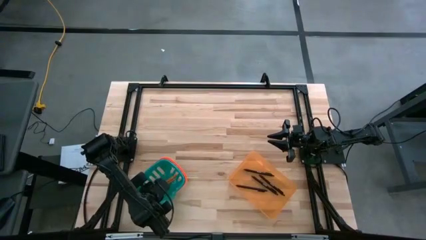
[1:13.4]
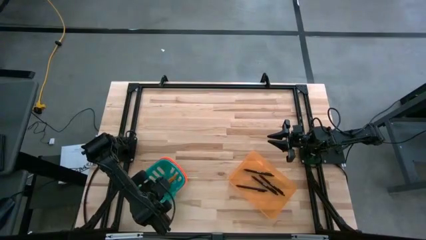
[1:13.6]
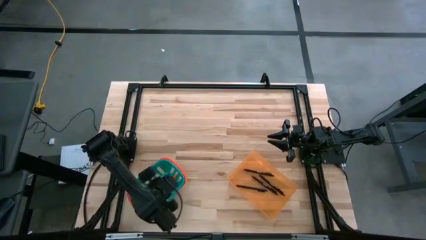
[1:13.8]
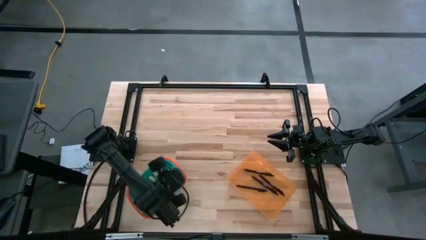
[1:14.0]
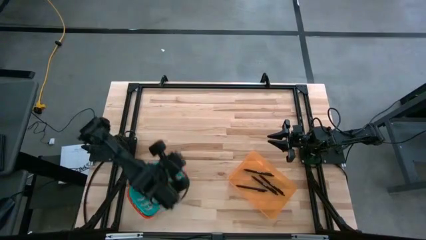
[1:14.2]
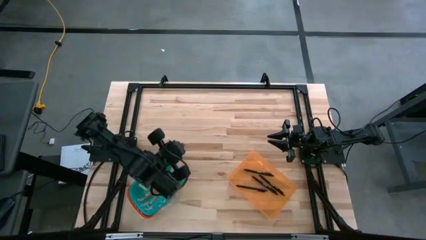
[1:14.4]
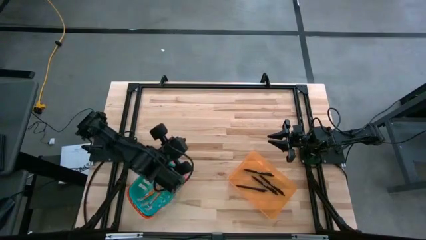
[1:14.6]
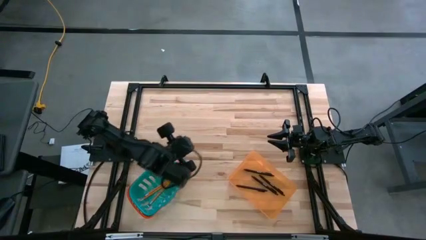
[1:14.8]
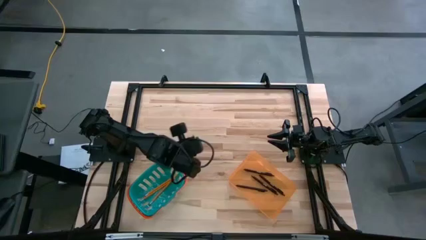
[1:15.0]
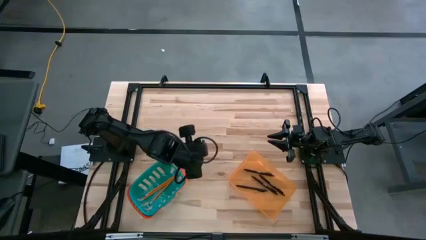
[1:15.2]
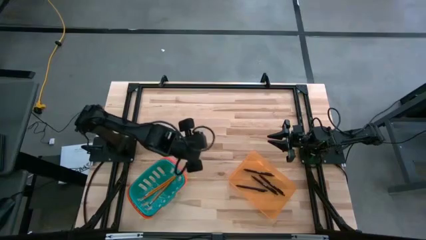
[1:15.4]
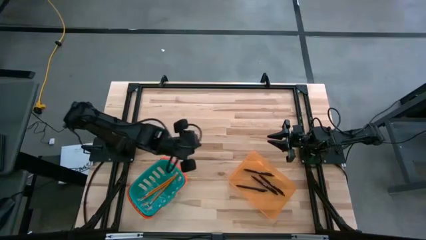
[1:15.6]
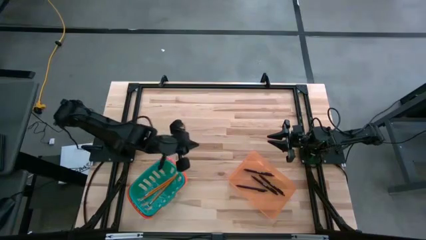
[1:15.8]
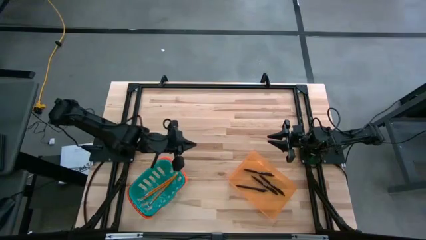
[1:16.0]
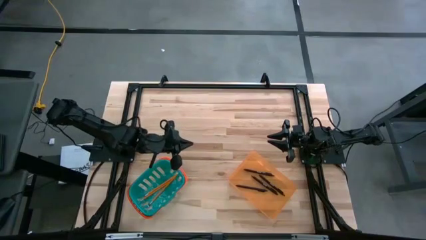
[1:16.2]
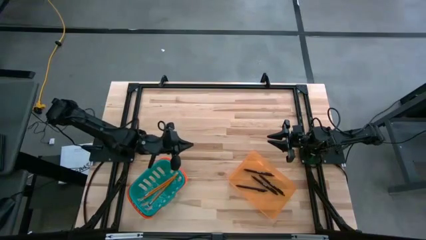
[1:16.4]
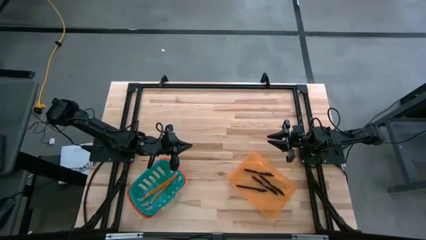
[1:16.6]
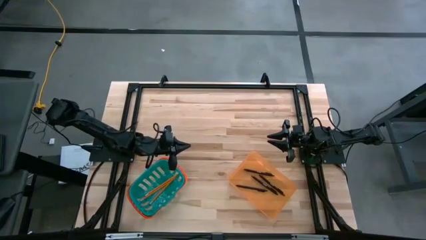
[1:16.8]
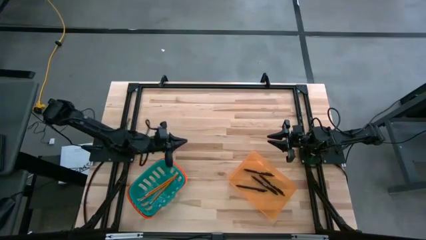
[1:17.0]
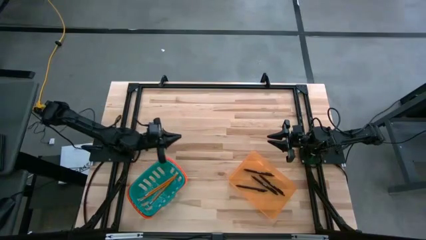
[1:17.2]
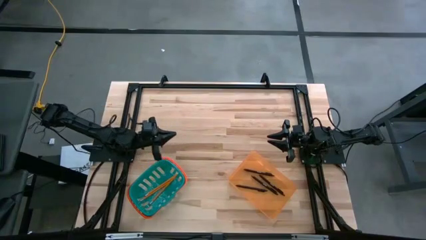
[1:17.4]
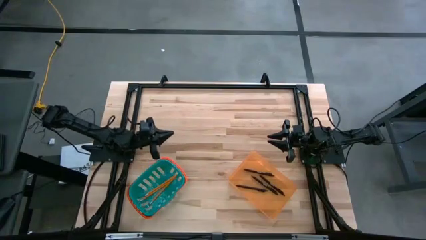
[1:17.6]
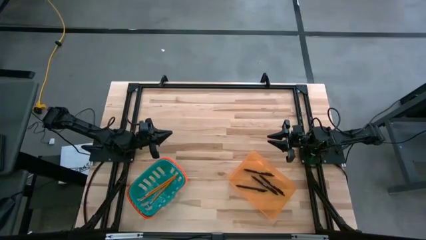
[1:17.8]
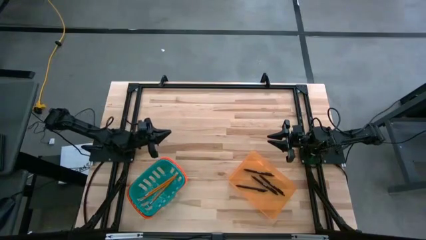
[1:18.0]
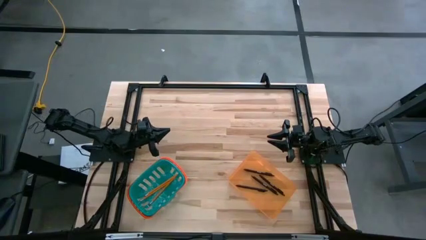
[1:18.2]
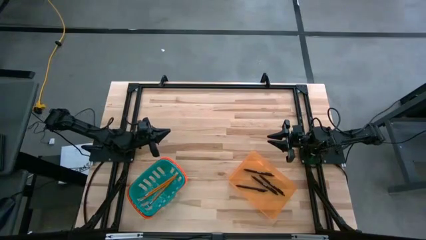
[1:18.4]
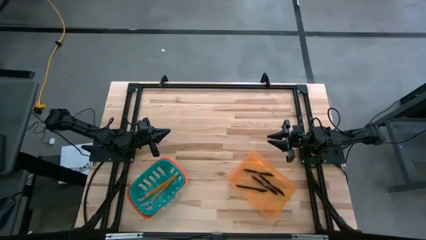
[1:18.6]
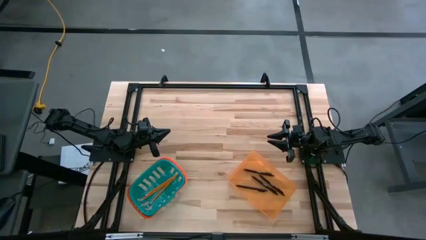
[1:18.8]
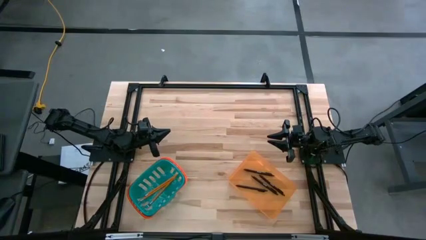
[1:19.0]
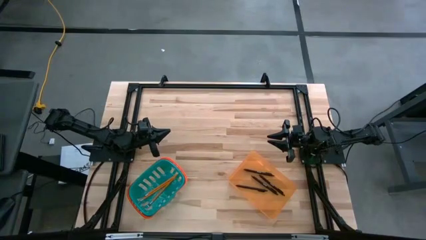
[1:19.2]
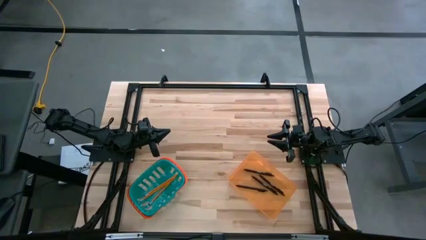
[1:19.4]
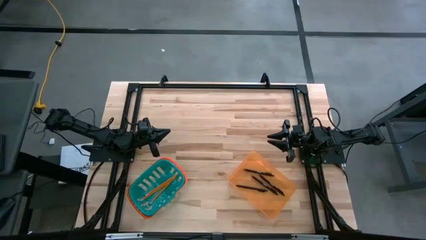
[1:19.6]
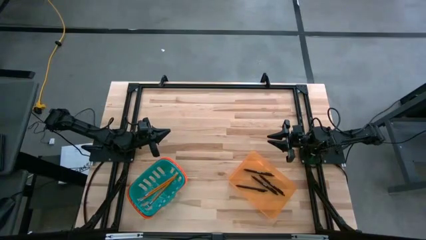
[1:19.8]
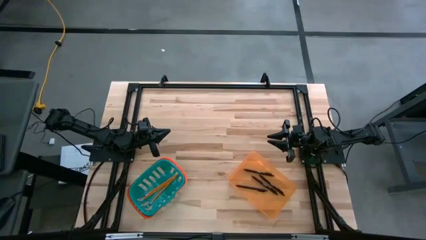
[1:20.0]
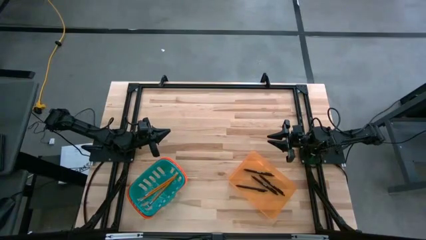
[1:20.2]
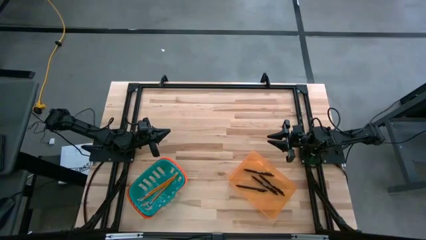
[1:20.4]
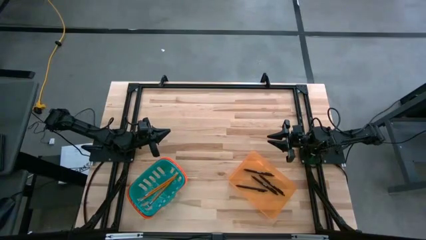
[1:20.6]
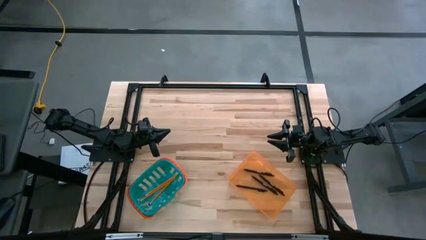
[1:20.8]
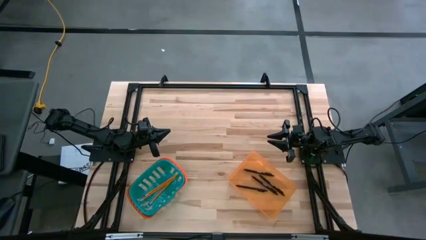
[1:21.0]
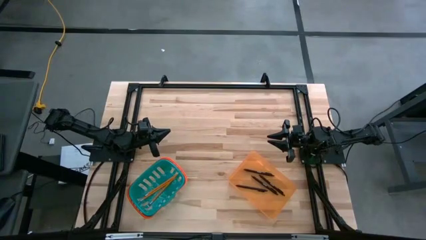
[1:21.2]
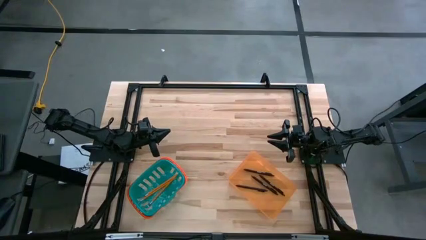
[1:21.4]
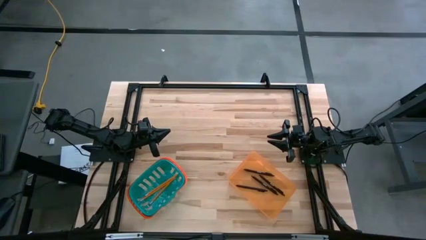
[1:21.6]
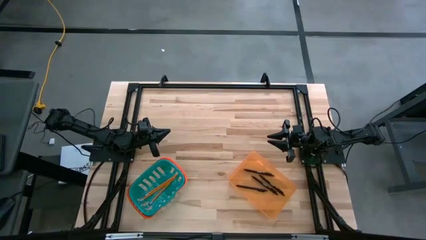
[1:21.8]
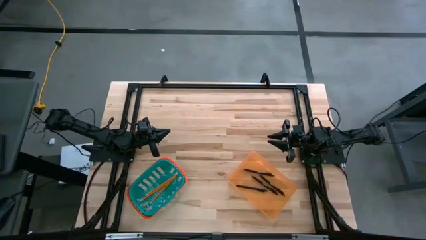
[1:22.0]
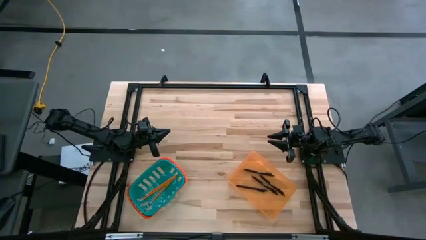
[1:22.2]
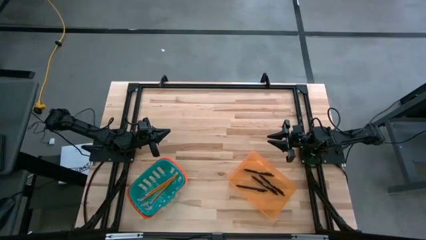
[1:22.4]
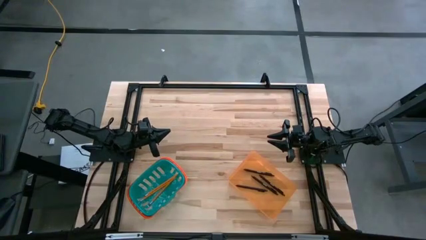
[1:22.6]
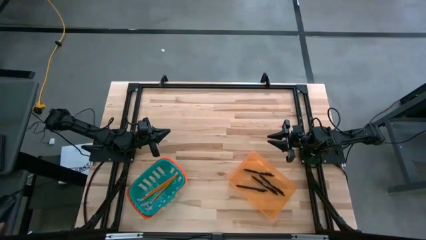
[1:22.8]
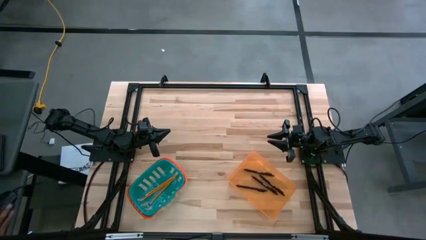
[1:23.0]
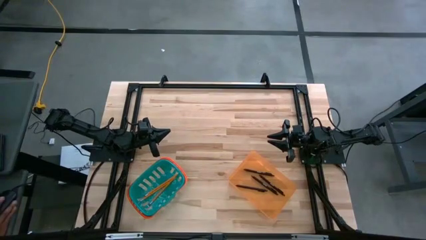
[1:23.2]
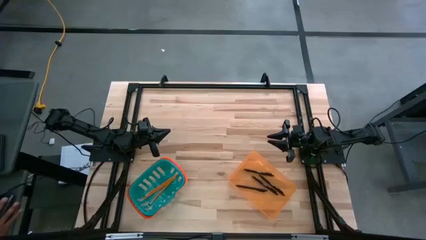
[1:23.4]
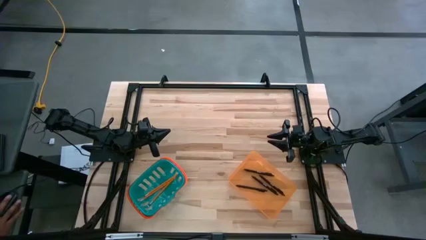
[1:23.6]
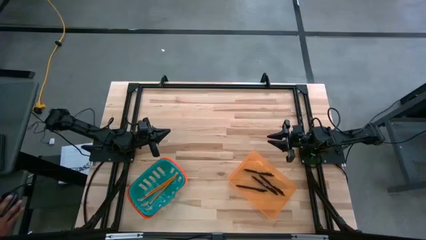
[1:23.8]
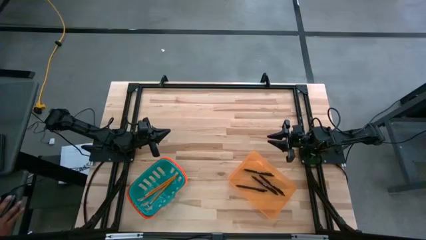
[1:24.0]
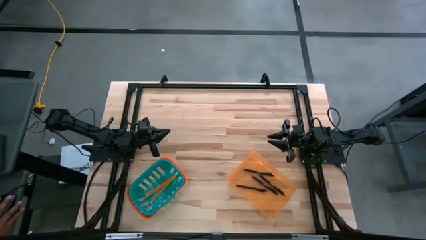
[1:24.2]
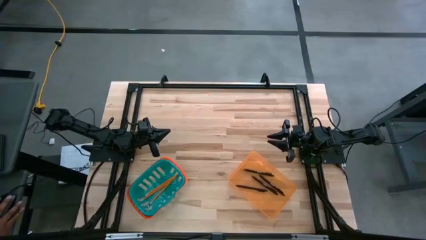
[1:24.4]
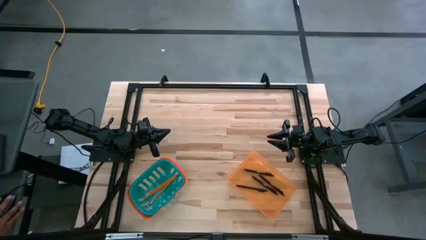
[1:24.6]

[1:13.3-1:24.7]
Task: Sort pens & pencils
Return to Home Position

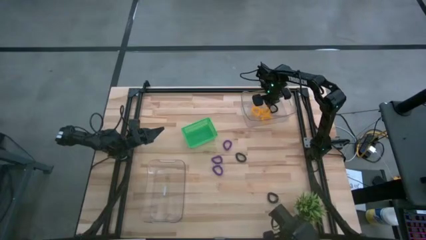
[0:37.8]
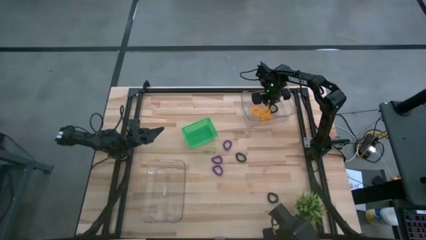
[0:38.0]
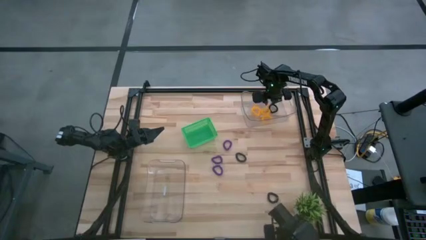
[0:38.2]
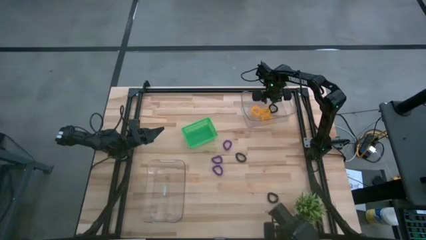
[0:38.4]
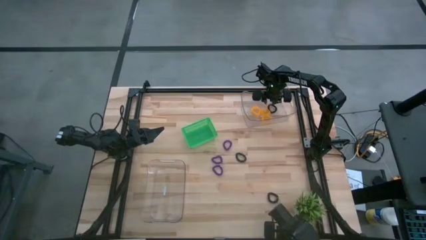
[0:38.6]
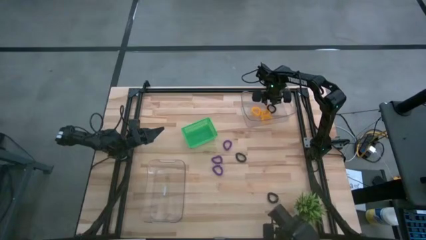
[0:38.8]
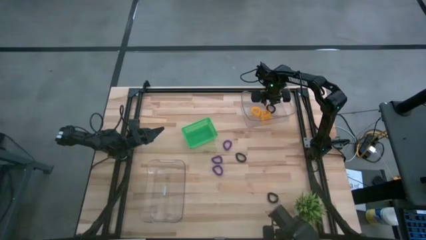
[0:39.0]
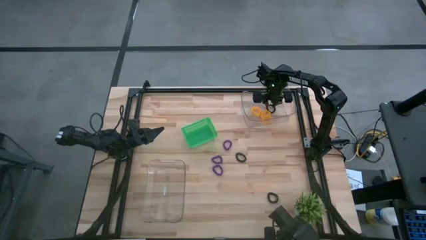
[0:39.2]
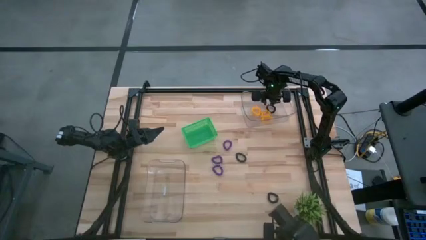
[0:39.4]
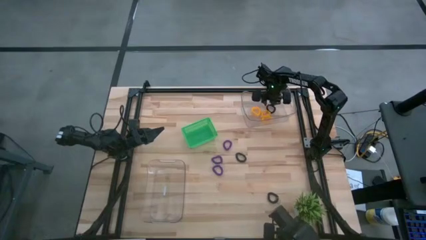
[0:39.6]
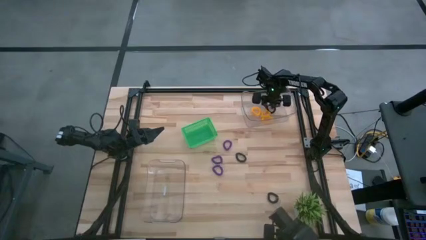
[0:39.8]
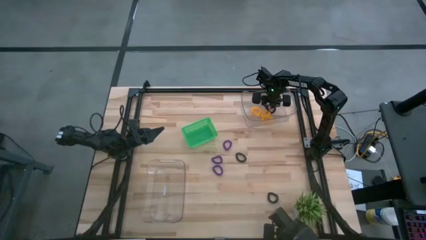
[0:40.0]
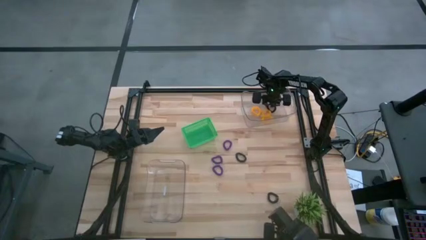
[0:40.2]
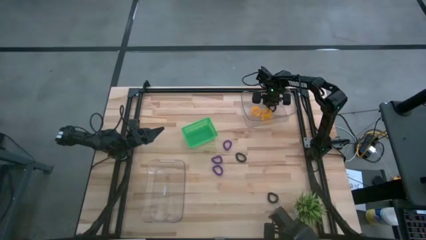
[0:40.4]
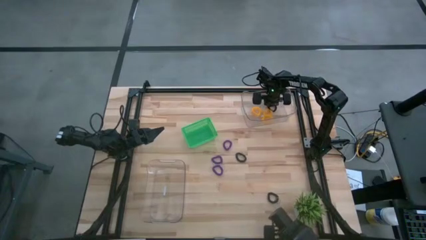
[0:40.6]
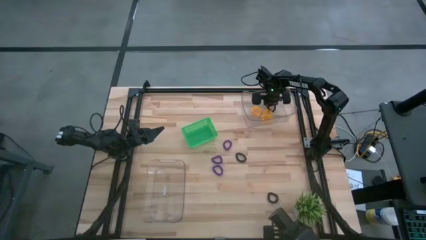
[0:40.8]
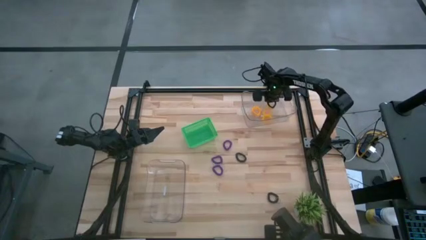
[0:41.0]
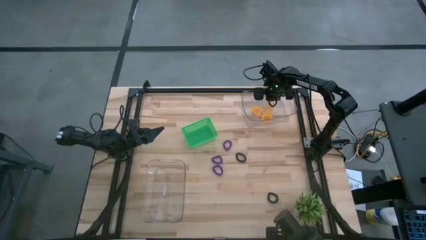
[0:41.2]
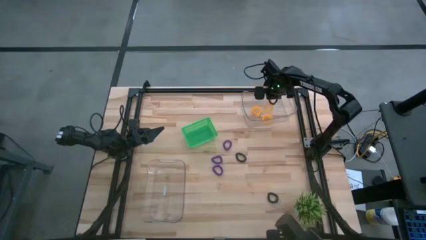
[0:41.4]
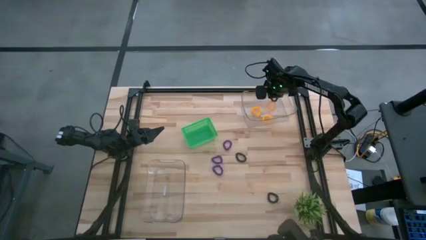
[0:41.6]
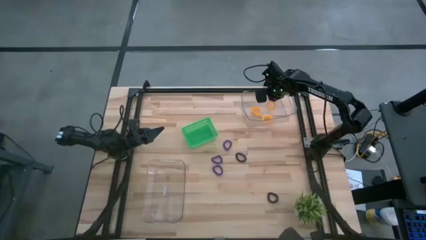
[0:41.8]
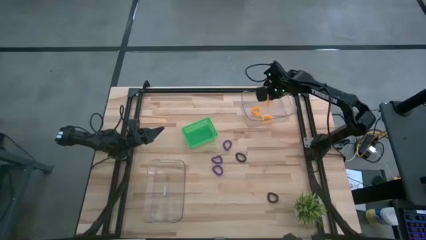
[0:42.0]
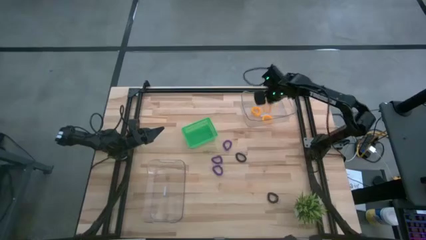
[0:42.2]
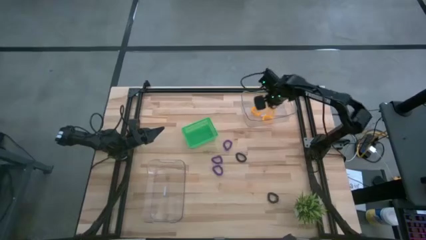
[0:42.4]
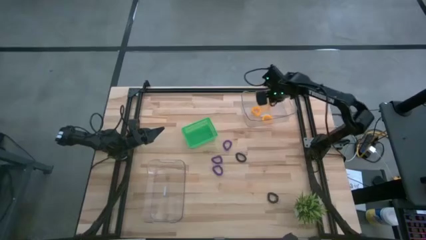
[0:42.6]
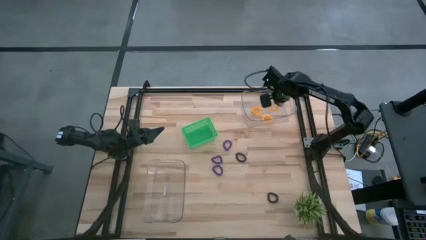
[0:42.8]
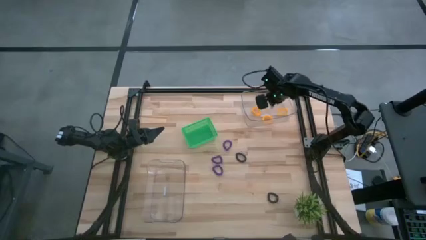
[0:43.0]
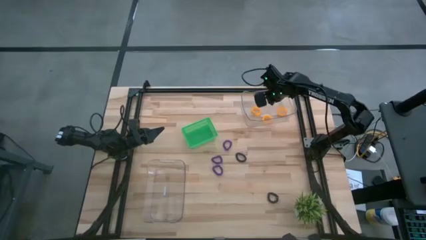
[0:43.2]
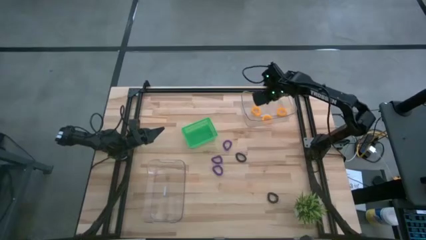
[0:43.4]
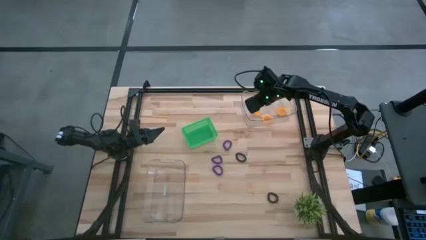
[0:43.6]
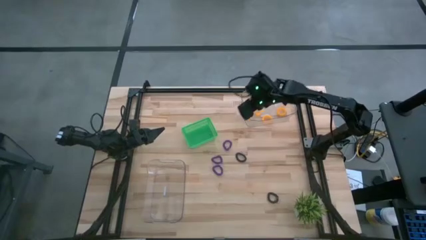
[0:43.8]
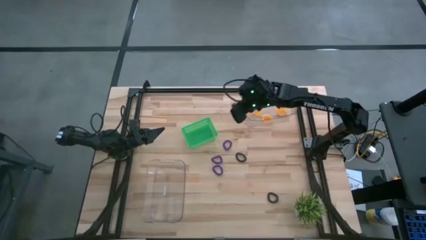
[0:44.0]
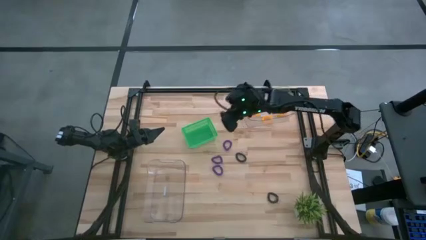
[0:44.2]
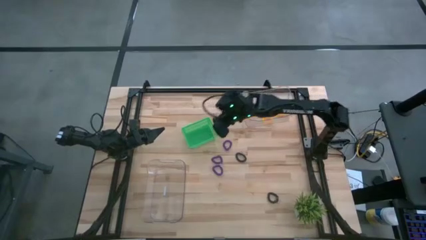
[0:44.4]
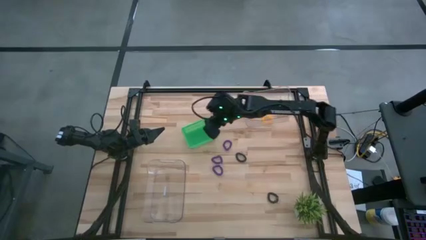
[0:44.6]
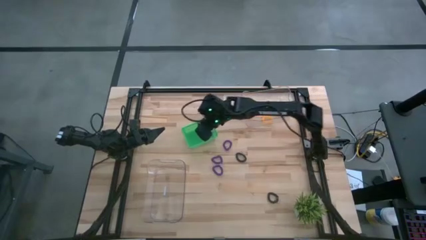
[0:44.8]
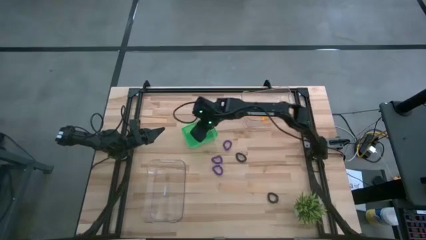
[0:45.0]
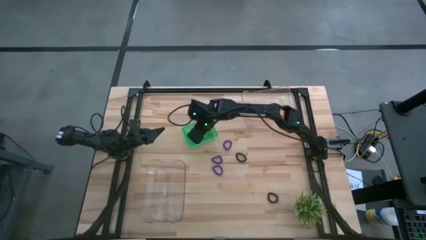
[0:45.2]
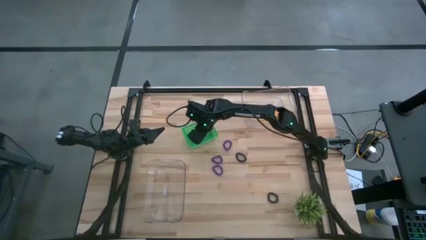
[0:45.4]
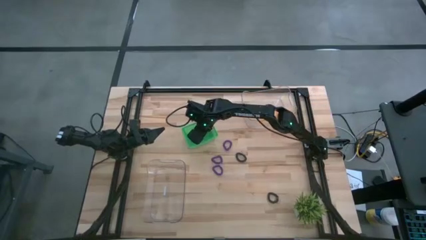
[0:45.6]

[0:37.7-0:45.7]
Task: Sort spring keychains
Put the bottom black spring keychain into the green bin
